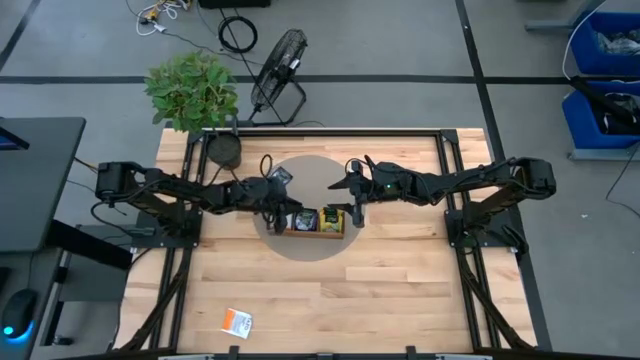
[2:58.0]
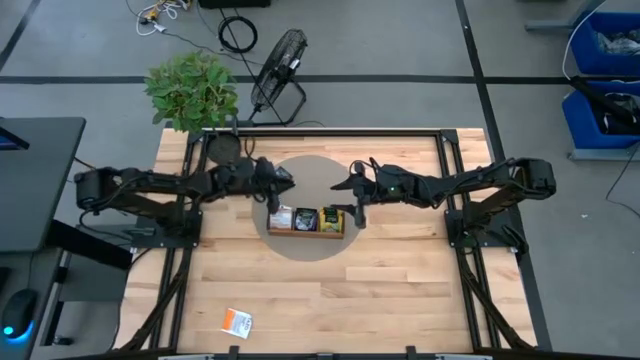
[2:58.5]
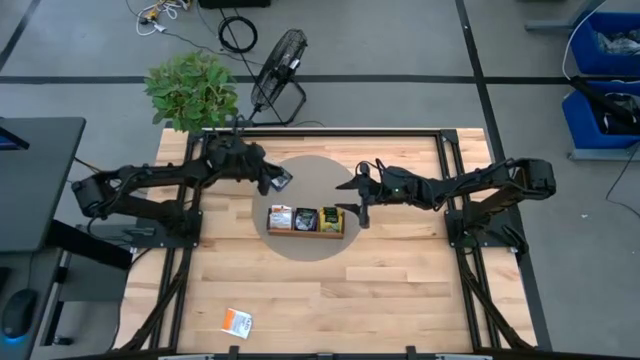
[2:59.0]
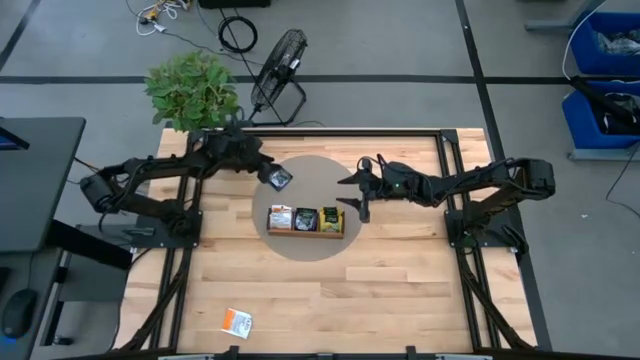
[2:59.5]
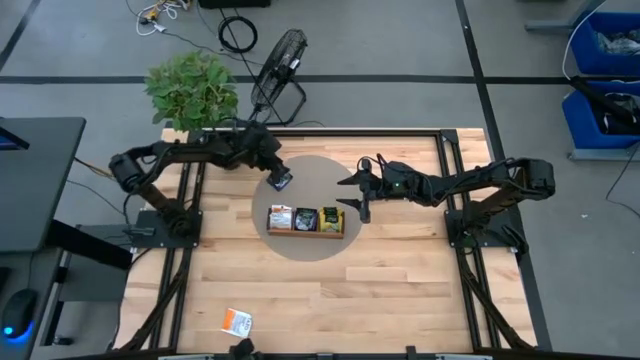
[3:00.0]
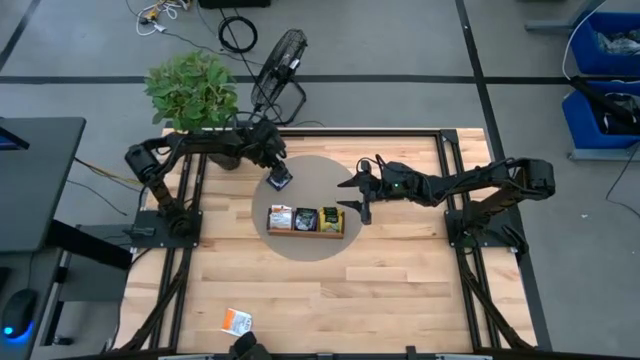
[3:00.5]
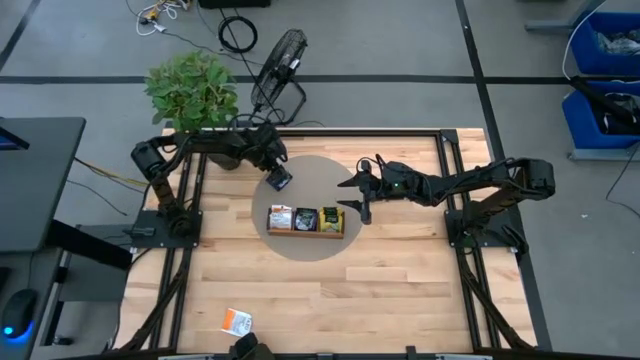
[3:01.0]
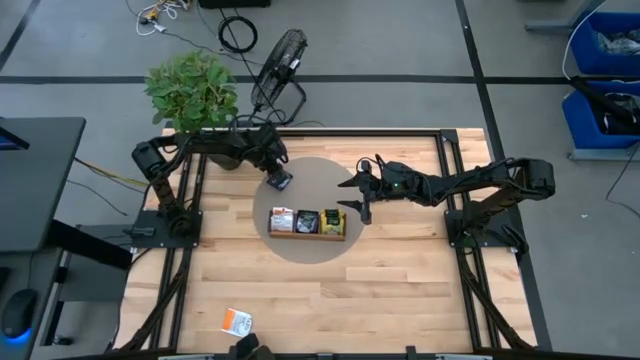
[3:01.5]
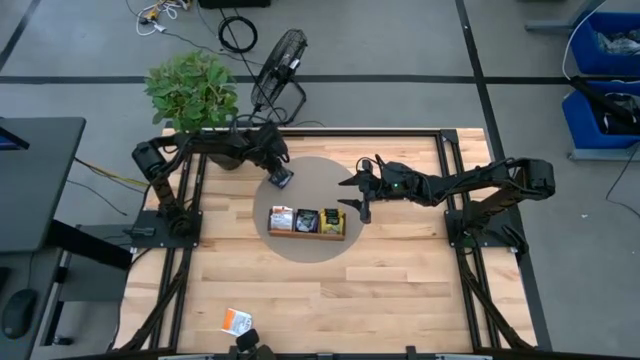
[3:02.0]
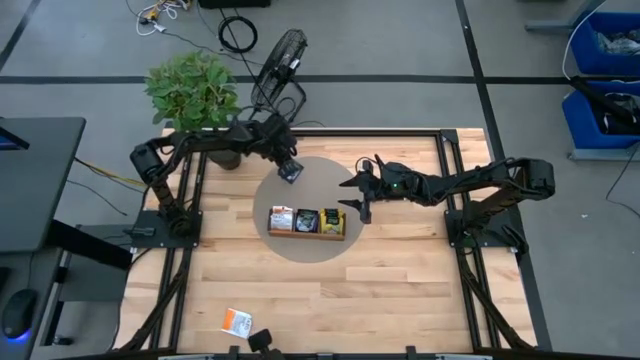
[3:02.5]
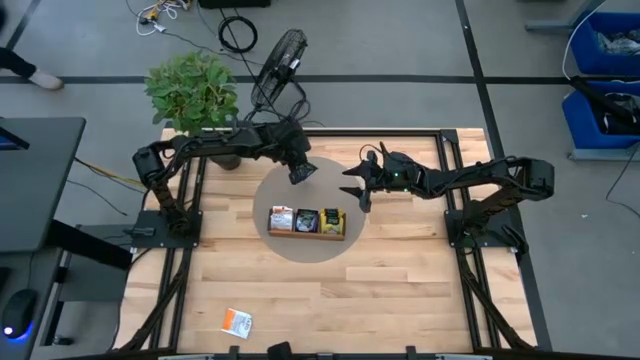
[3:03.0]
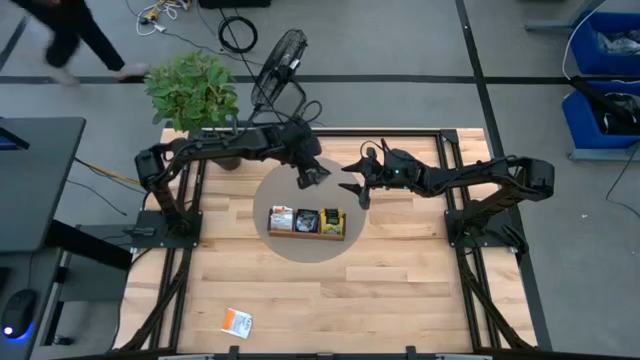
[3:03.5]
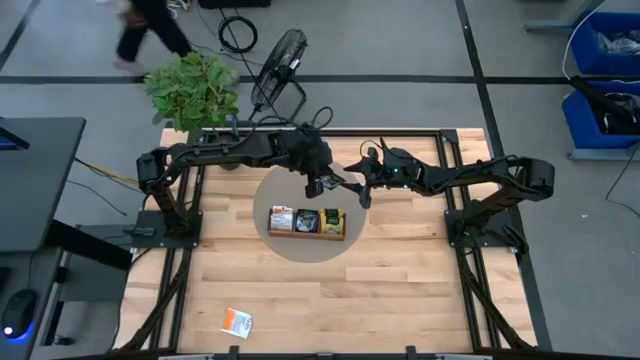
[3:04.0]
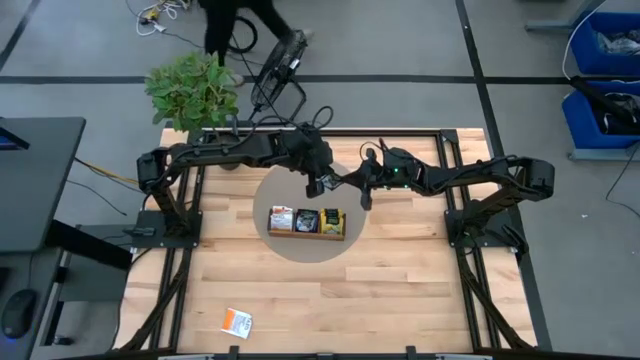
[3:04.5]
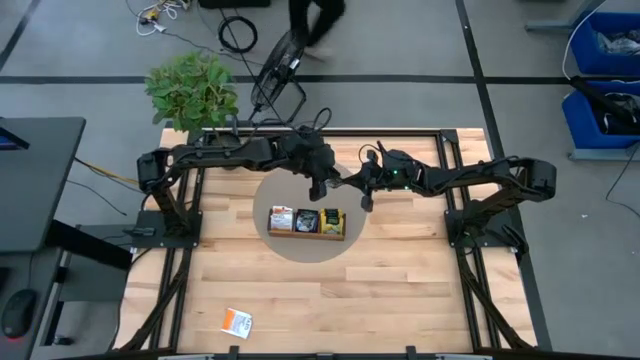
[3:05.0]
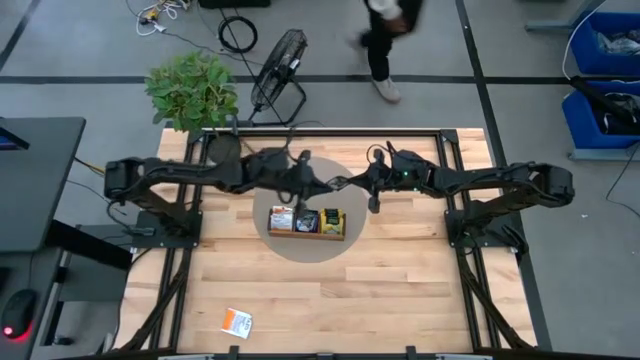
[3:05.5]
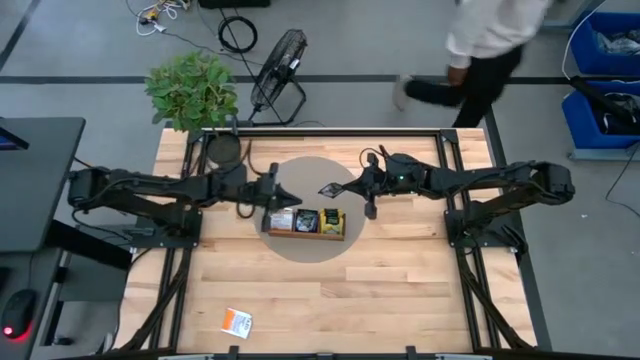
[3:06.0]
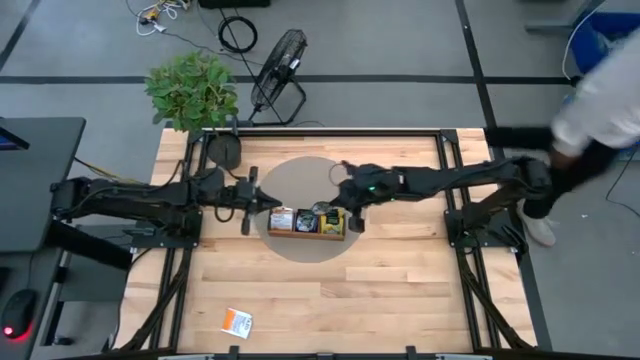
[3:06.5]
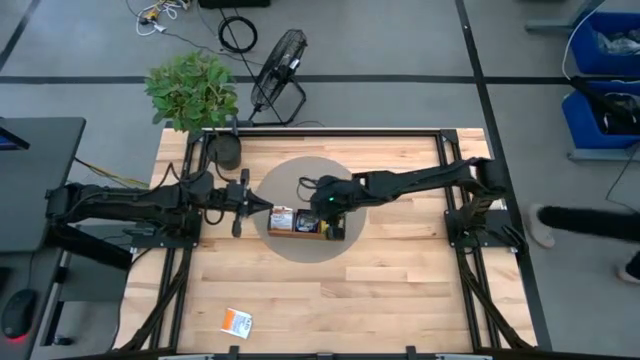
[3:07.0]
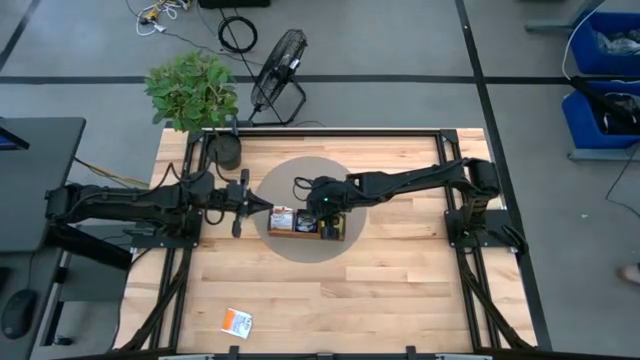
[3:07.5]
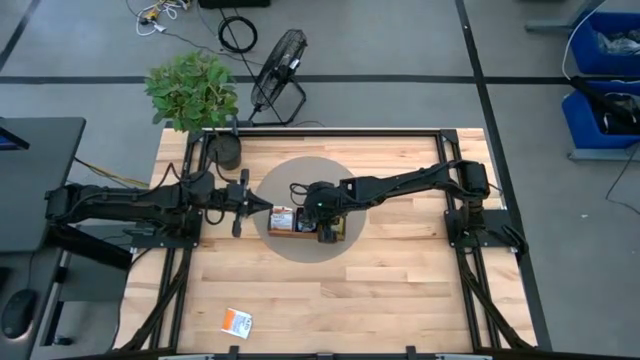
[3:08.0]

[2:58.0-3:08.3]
Task: Pick & Place Tea
Put the purple tea bag into the middle compartment of the wooden organizer

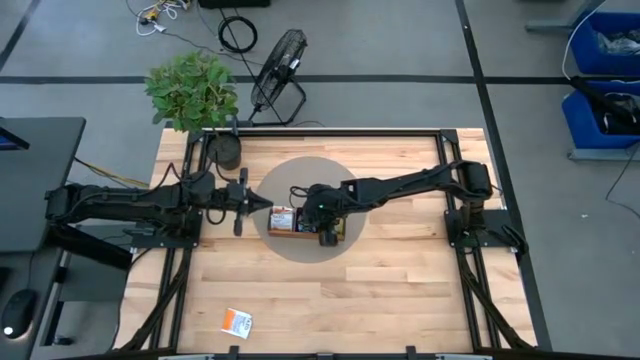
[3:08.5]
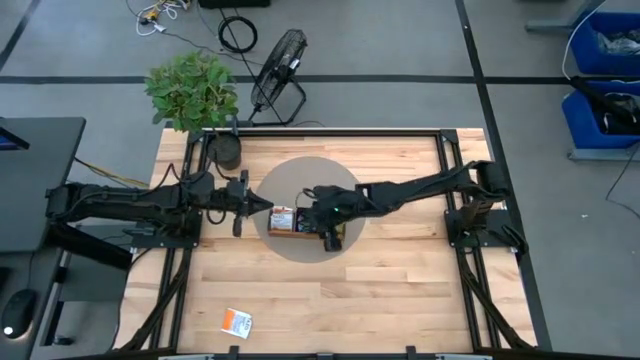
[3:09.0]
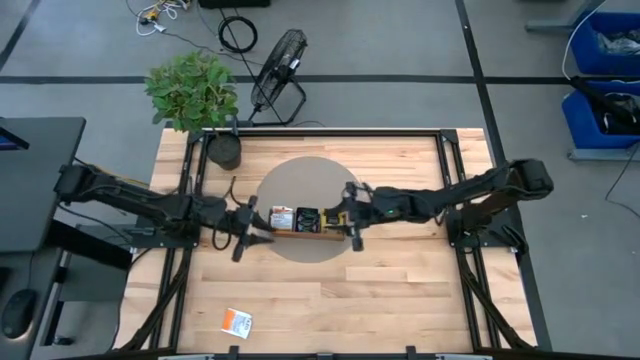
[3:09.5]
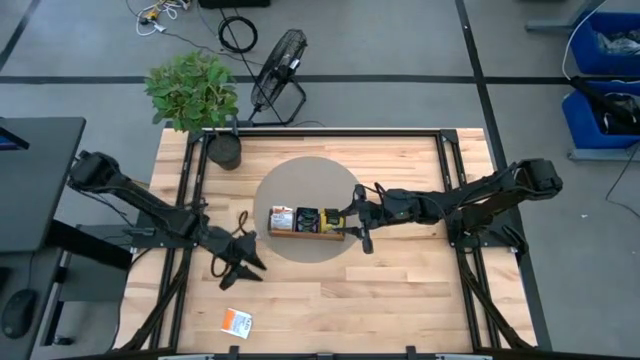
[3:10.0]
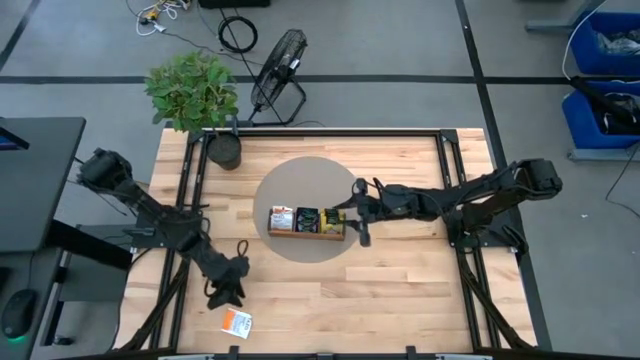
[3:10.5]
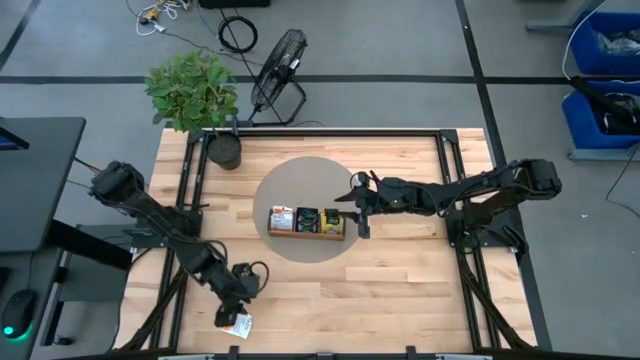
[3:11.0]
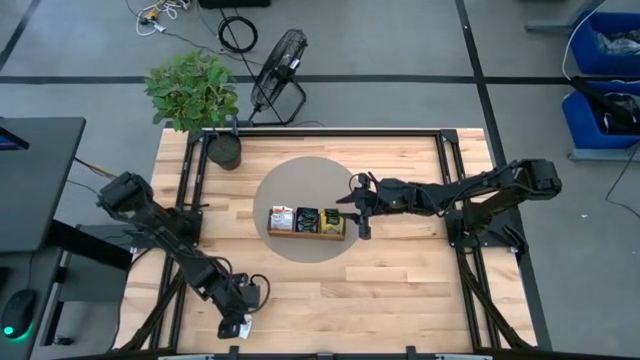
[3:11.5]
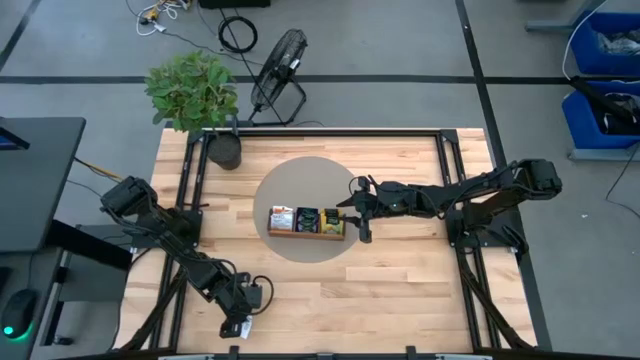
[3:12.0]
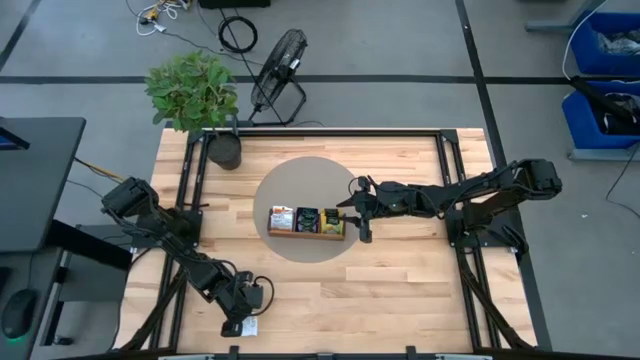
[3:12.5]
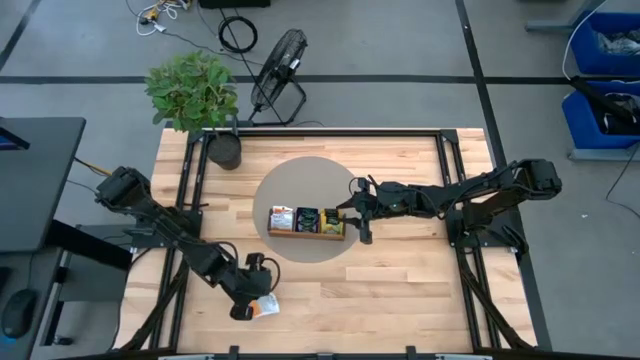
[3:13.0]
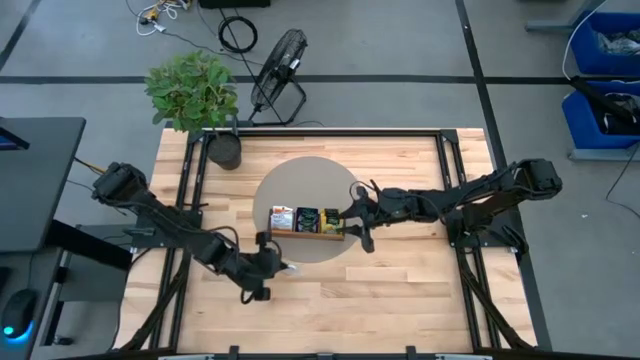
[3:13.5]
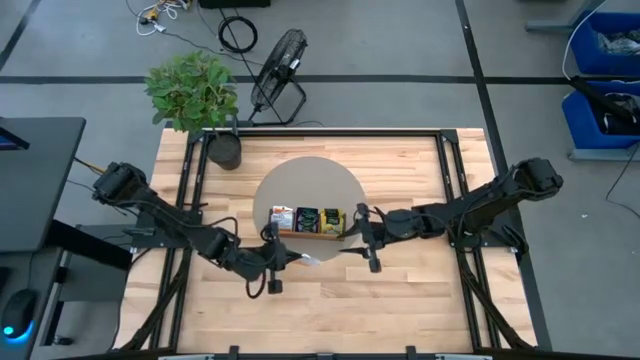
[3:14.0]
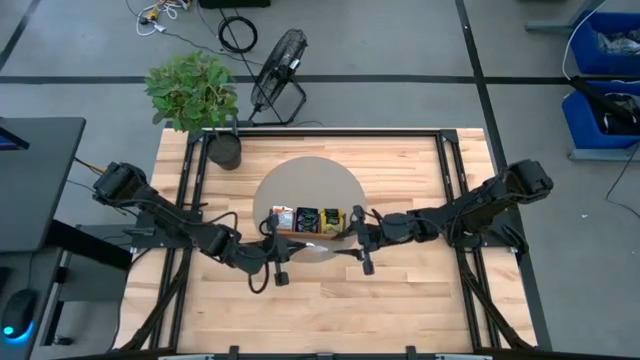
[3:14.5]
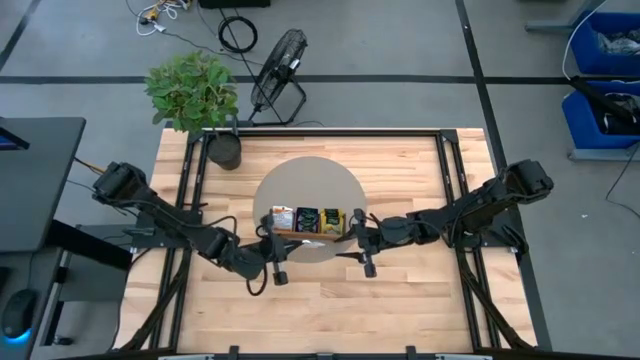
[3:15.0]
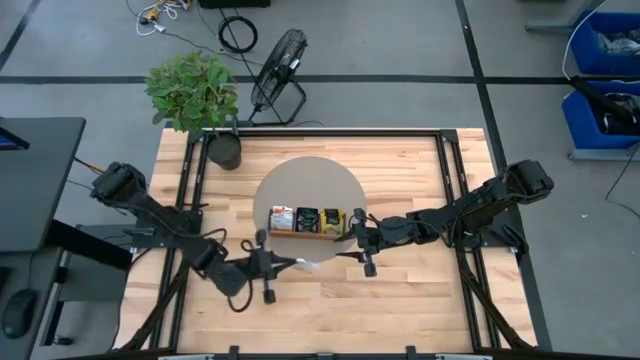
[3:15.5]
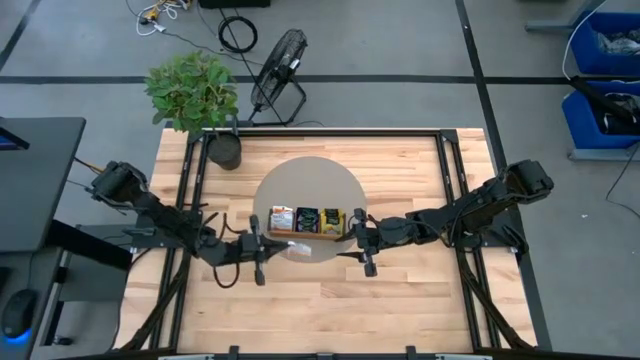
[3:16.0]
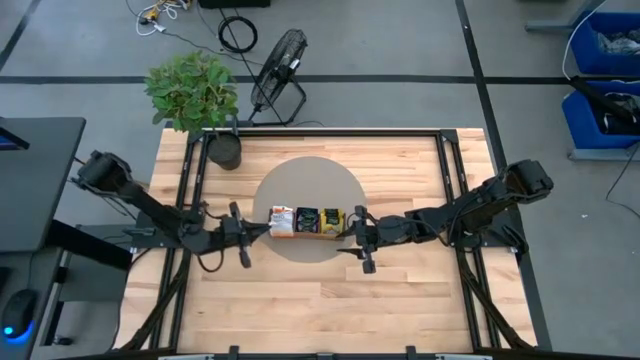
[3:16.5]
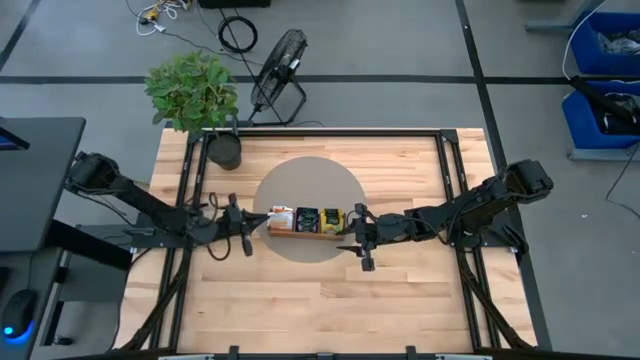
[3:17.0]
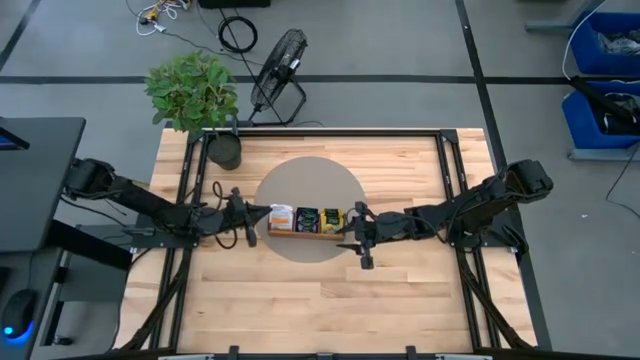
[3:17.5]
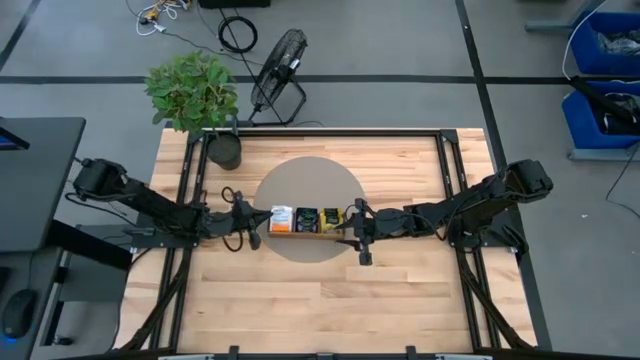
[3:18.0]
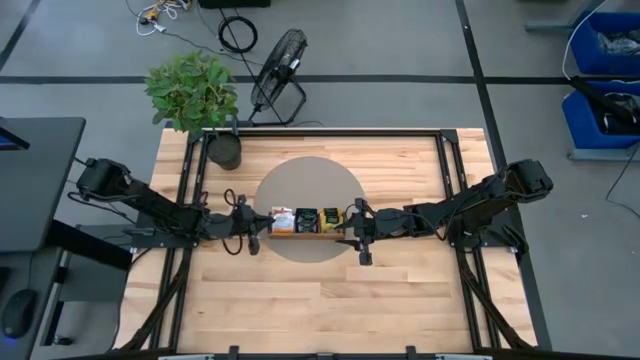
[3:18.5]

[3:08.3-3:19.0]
Put the orange tea bag into the left compartment of the wooden organizer

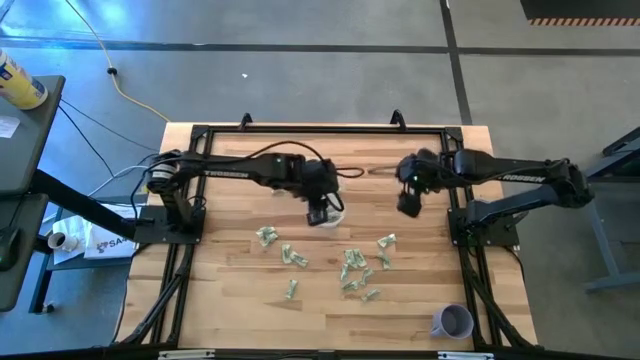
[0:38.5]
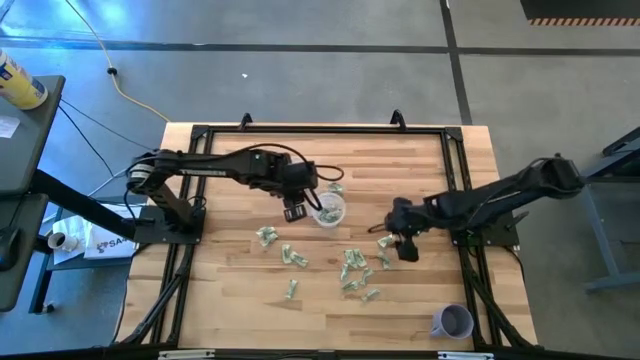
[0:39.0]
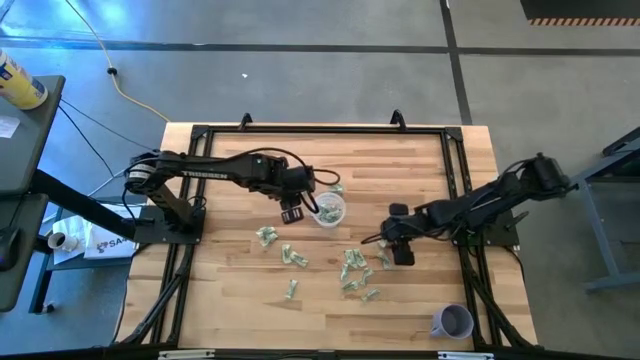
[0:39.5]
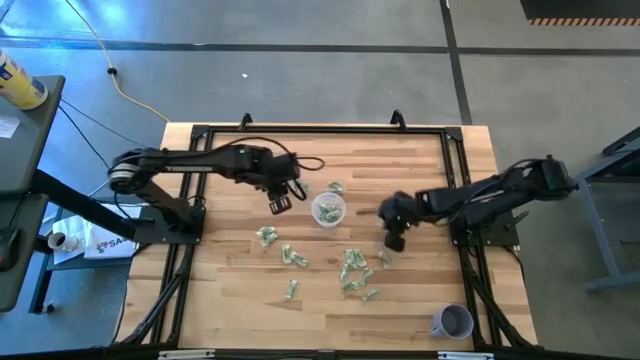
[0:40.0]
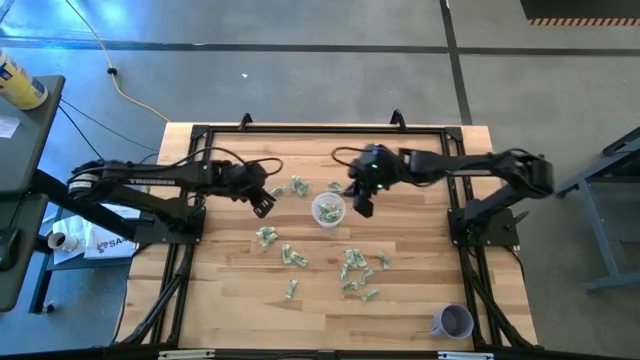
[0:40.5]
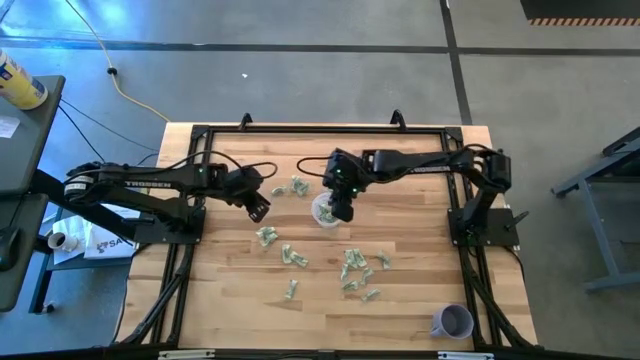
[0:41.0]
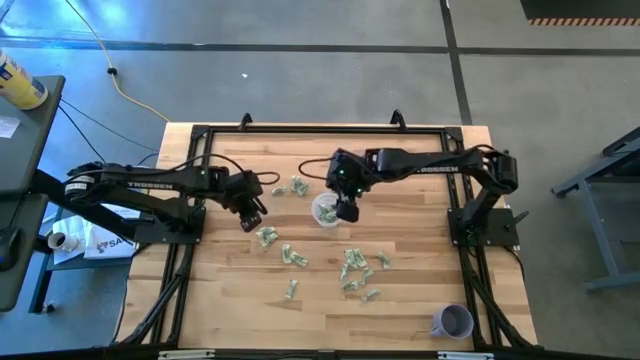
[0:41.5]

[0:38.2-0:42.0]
Task: Pick and place Stevia / Truvia into bins
Put the white stevia packet into the transparent container
